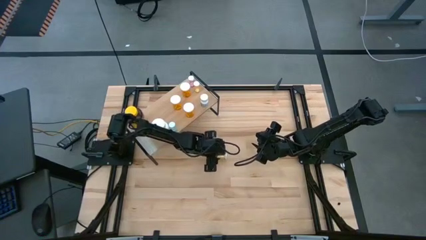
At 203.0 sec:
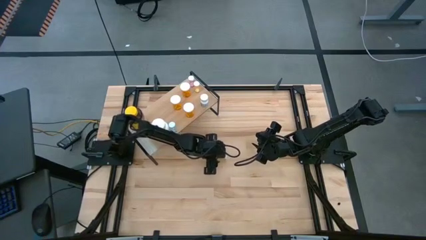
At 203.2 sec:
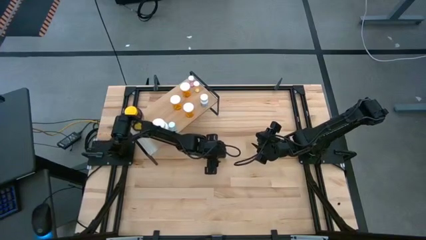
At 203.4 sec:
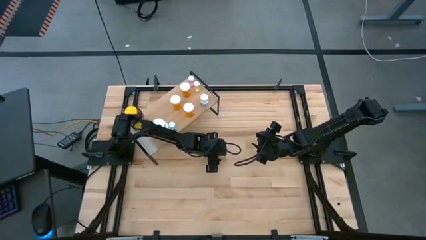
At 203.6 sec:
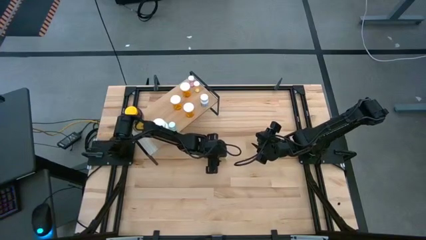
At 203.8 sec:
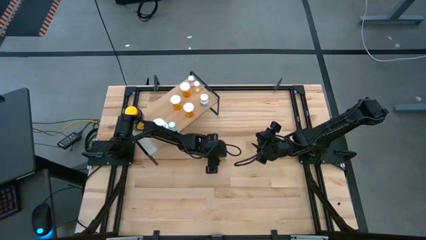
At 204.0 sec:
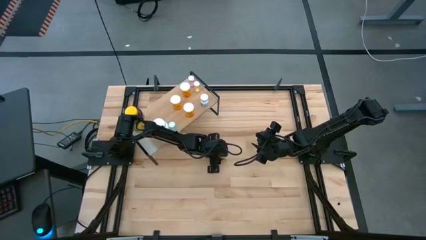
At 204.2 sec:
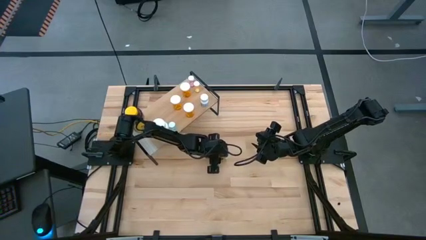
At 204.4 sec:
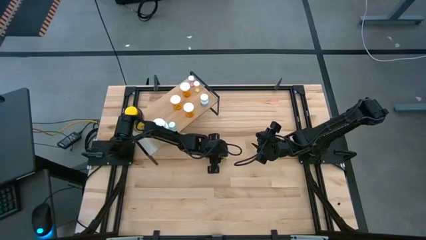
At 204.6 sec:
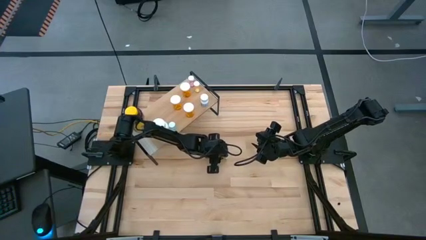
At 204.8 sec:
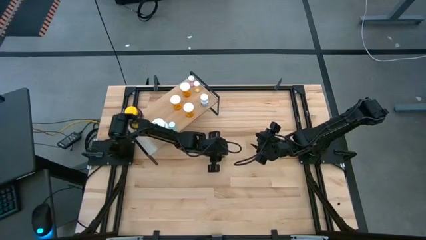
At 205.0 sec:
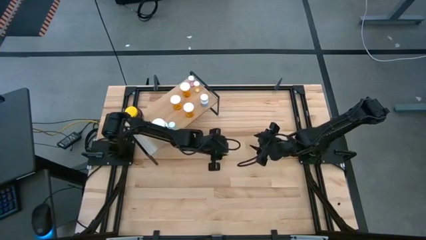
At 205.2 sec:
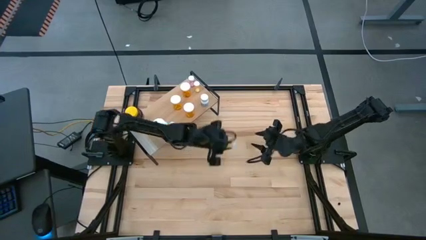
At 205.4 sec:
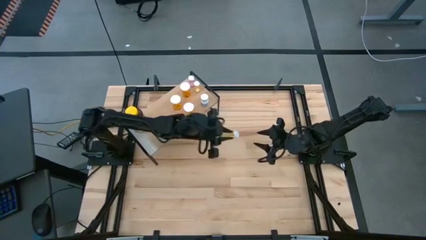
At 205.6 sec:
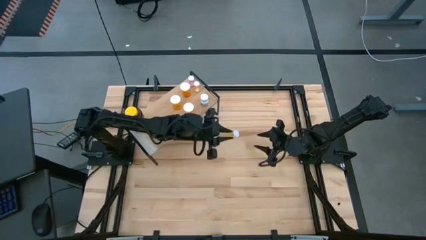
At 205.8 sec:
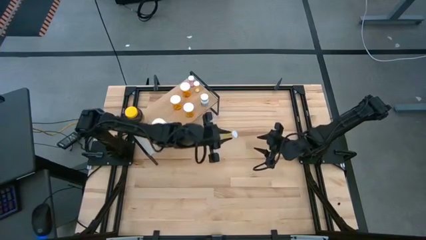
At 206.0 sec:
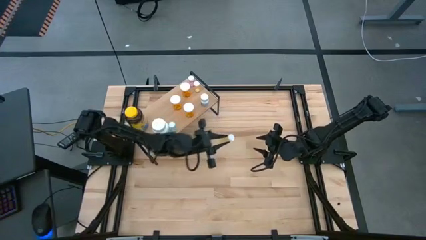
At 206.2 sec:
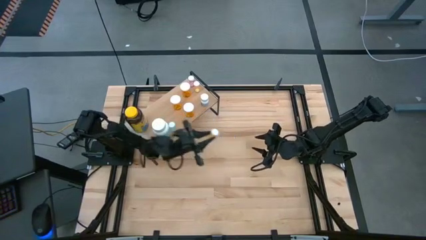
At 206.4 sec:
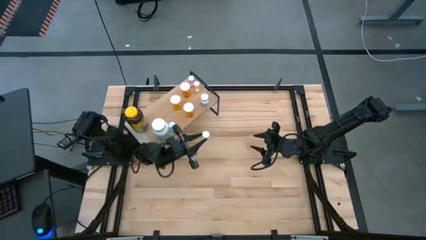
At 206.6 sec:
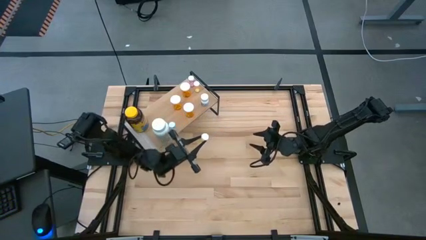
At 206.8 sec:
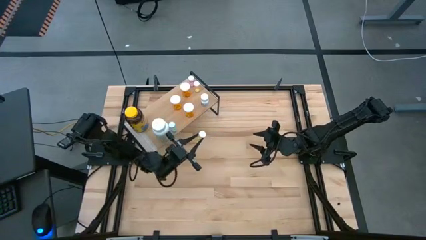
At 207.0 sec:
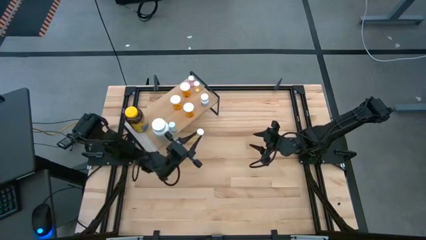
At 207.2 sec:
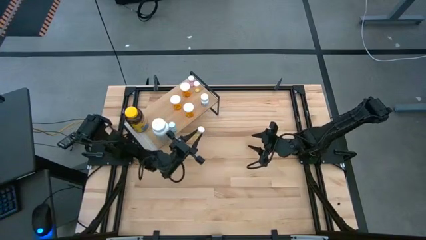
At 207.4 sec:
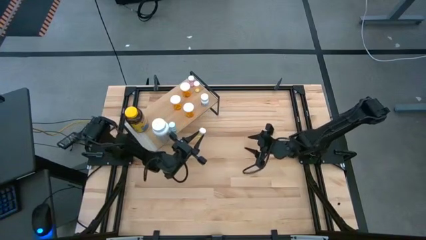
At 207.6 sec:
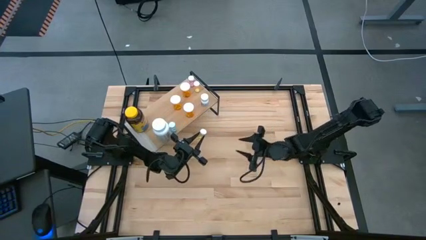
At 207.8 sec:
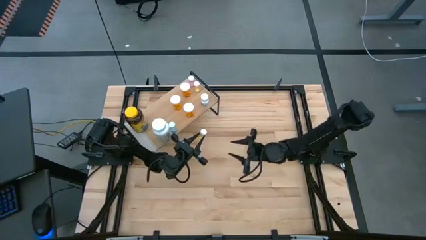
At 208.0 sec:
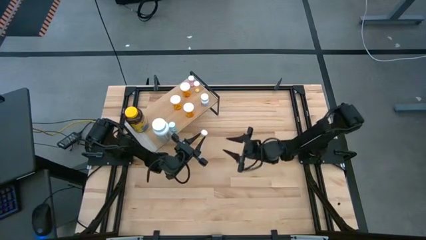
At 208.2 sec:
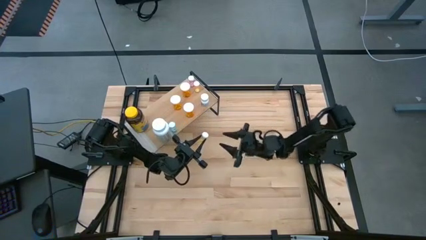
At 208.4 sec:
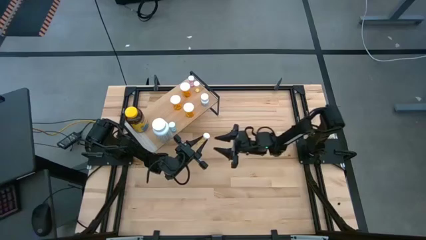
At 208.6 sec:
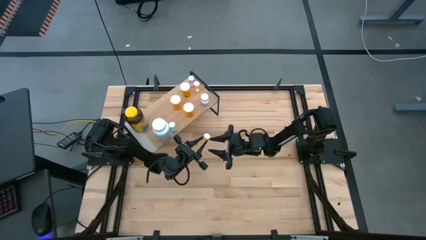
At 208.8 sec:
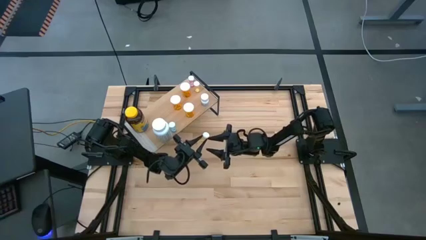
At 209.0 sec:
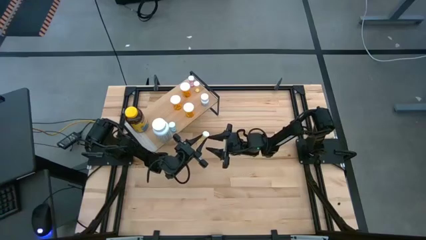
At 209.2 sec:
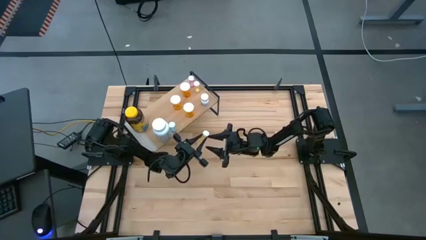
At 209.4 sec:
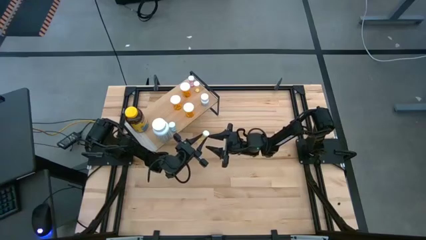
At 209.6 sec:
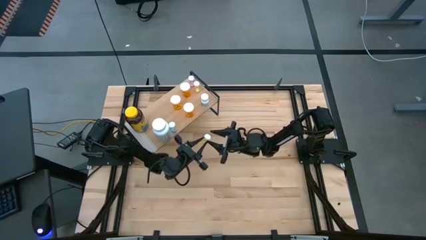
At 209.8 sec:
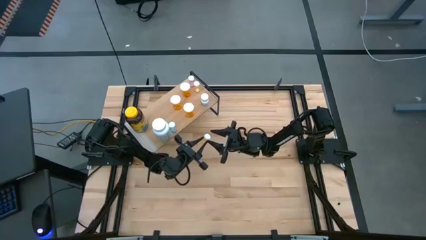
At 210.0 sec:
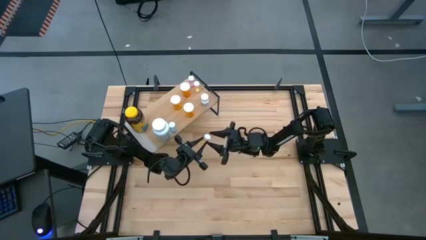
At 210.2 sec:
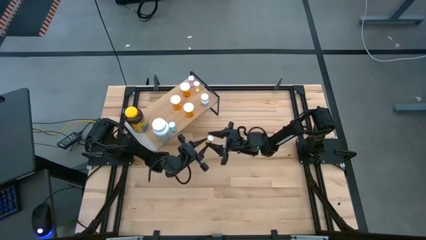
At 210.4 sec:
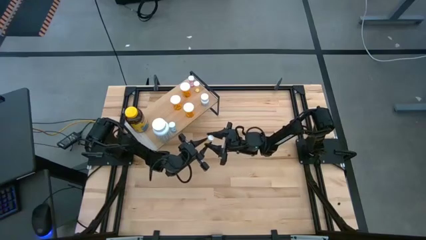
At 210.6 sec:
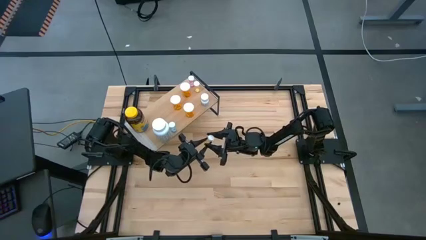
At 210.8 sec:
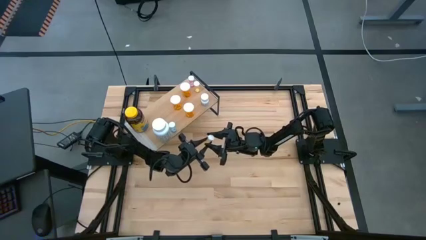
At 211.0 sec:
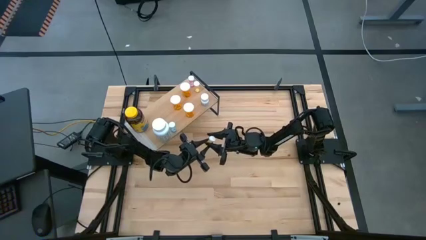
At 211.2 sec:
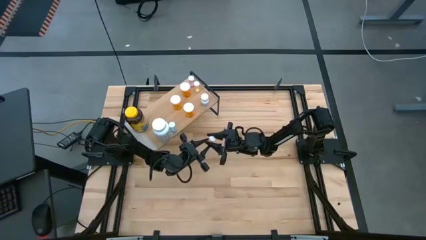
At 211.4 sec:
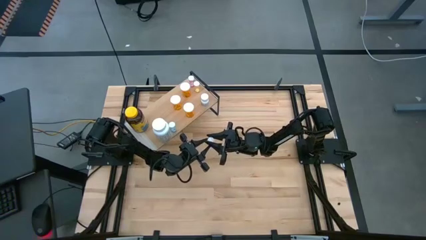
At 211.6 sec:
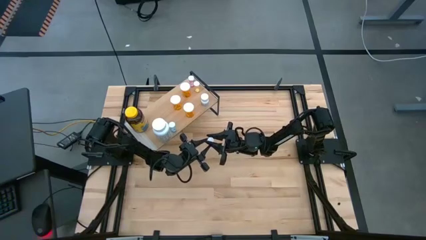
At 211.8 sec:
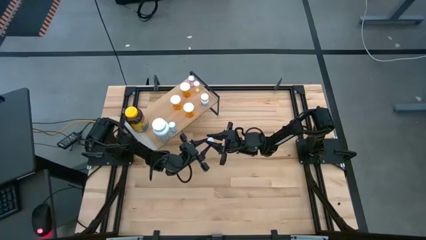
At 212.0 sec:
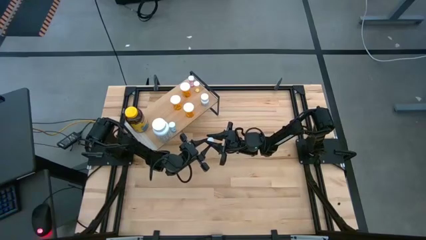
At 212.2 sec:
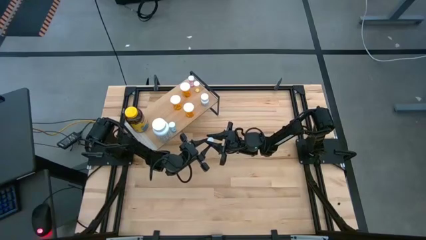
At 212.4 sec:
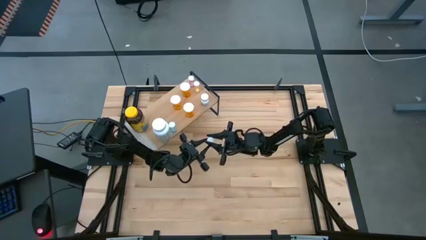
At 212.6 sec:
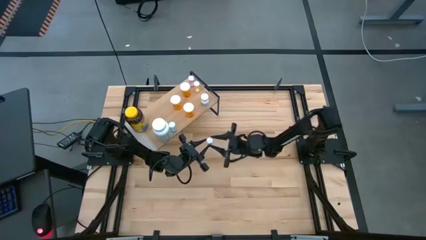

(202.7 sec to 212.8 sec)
Task: Pick and place medicine bottles onto shelf by color
Put the small yellow pill bottle on the shelf

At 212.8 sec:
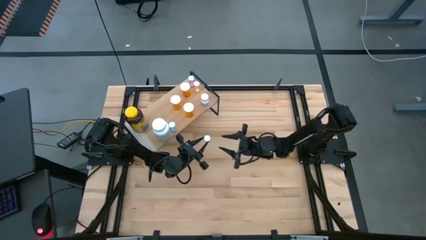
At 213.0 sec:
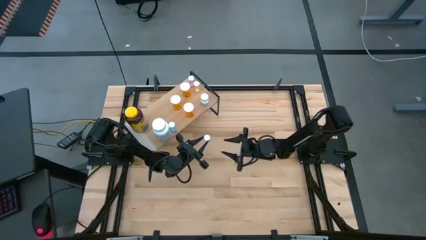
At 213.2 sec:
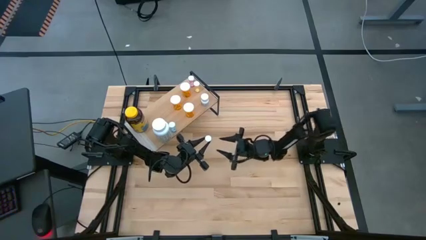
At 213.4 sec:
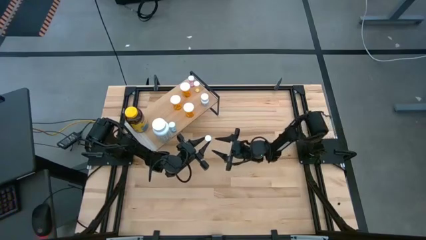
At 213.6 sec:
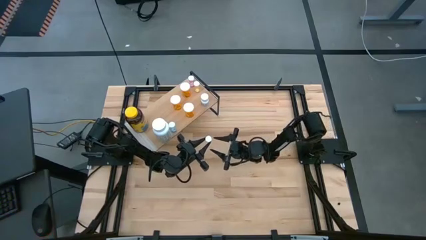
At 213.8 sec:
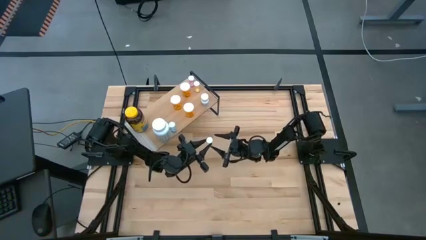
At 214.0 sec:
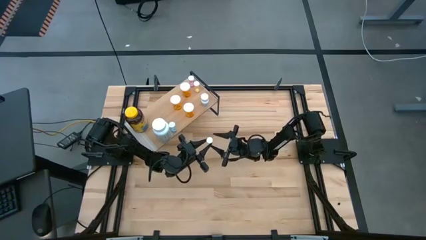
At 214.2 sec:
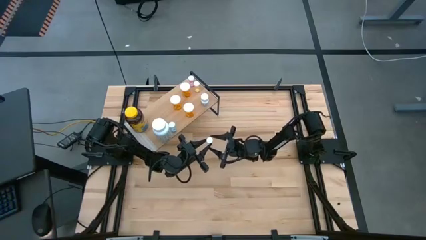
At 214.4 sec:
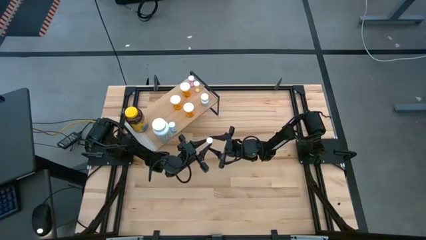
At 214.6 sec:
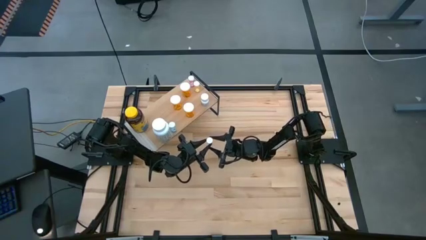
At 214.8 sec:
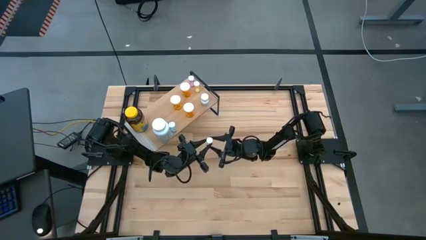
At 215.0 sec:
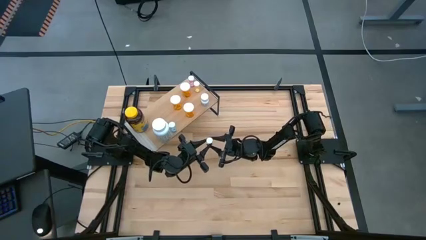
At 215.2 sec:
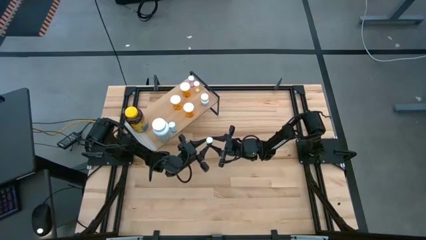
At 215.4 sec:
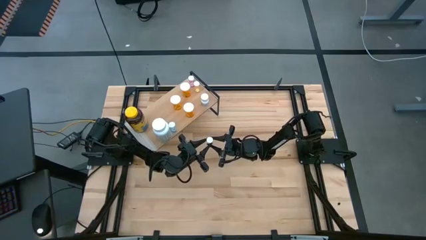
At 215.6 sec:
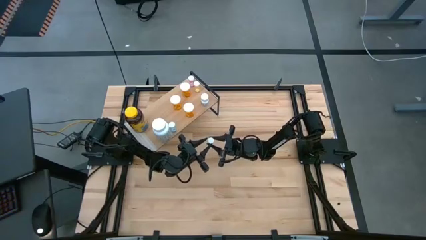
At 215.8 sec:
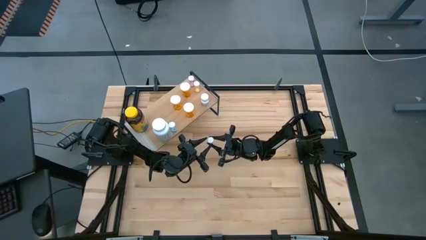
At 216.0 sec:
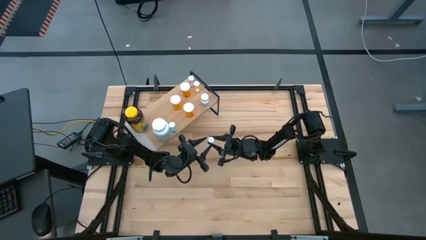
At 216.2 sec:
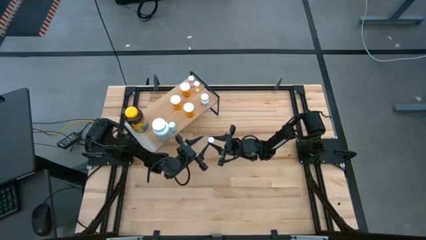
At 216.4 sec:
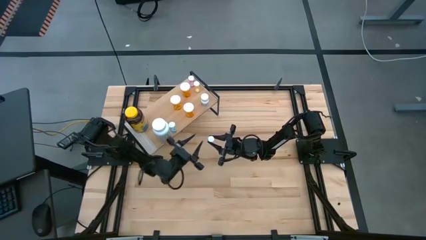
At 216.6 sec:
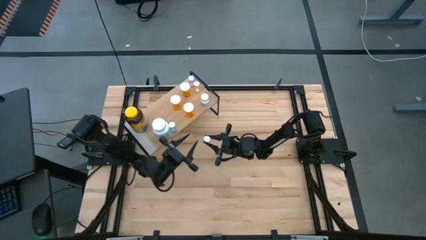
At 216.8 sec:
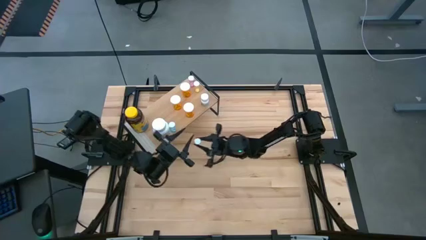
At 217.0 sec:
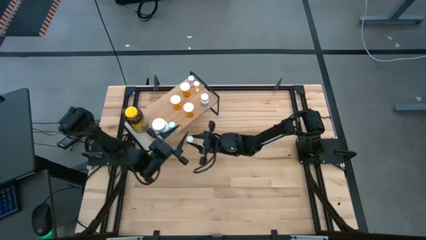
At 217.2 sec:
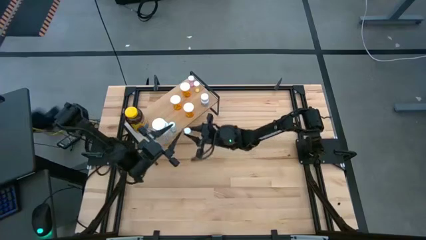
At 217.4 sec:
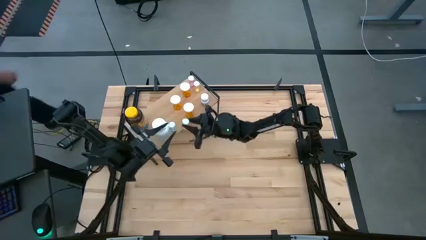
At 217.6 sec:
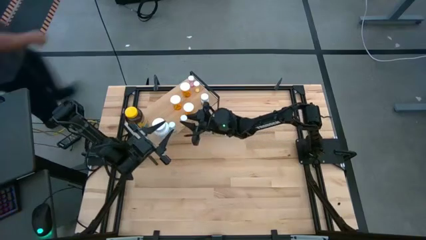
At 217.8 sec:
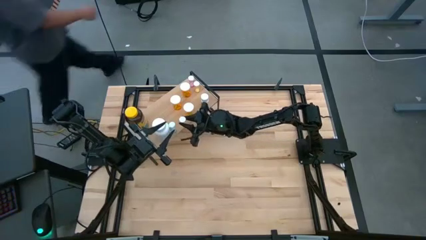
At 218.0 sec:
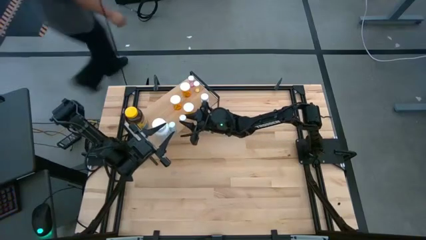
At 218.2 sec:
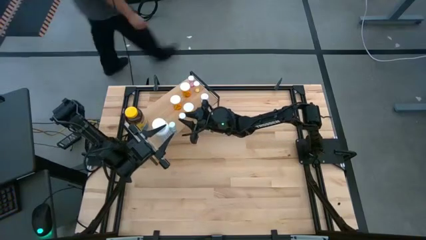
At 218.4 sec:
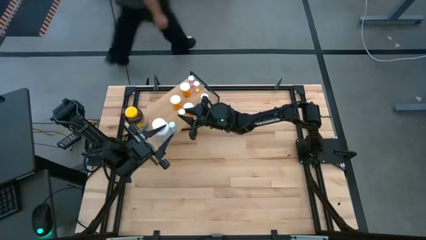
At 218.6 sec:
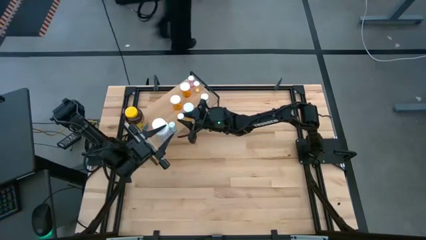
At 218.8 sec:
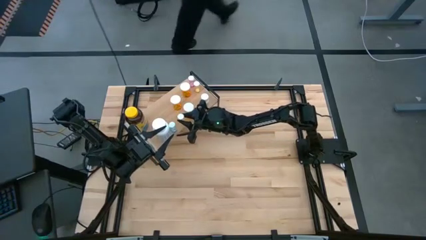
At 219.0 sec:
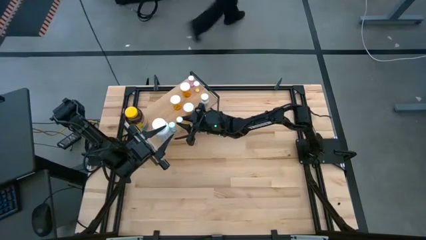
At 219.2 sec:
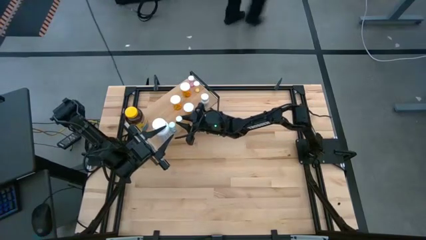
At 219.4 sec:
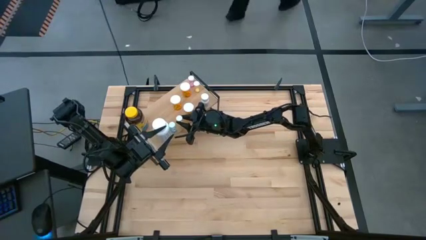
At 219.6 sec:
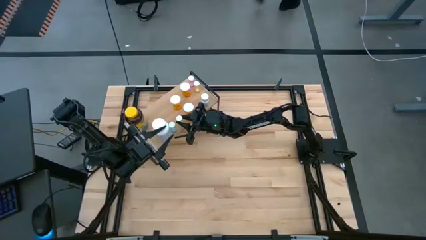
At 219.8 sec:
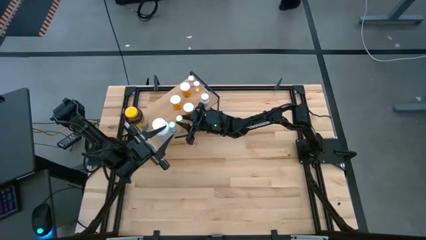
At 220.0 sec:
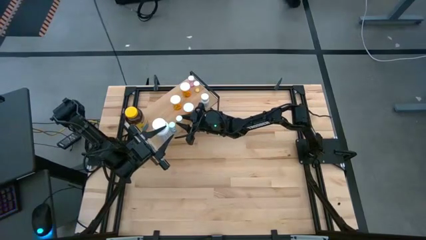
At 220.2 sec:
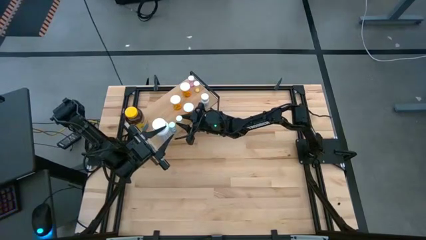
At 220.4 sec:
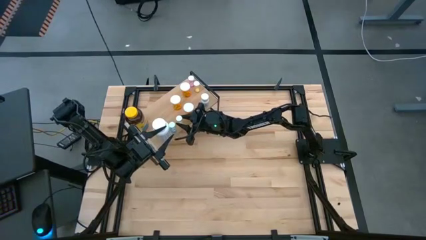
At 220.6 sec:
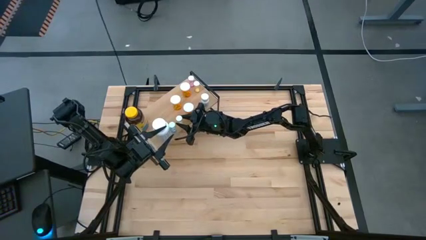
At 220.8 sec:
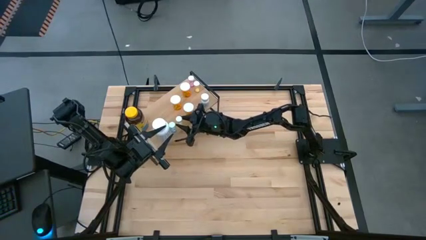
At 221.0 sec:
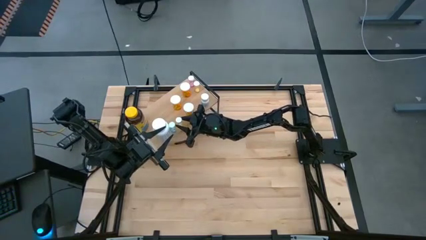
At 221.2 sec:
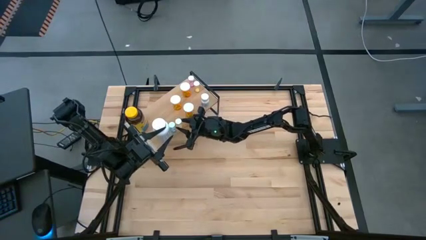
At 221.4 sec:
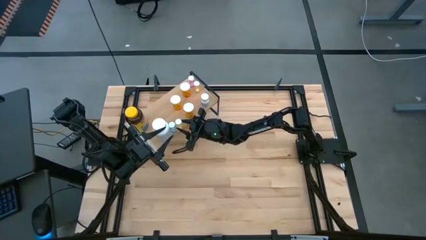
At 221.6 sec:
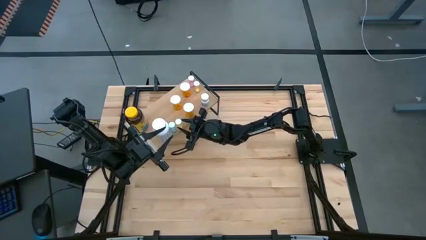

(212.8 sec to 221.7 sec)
Put the small yellow pill bottle on the shelf
